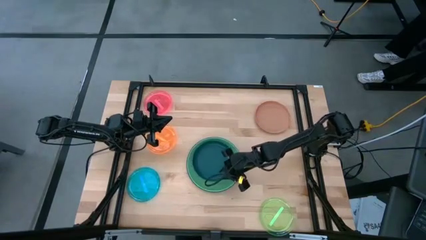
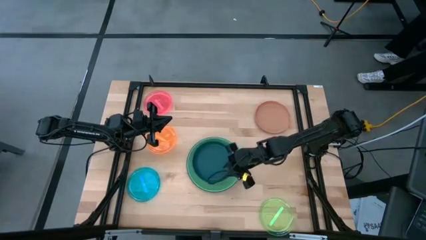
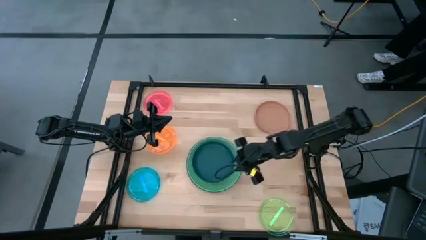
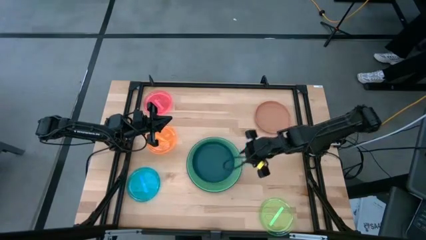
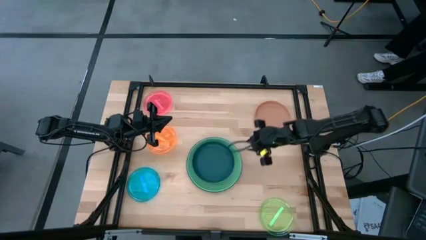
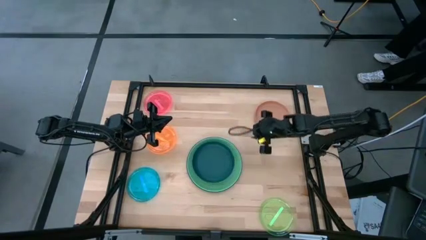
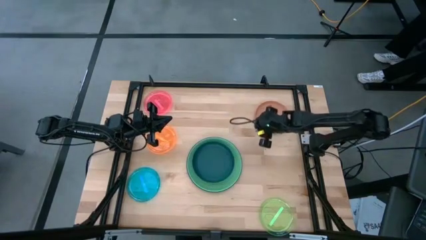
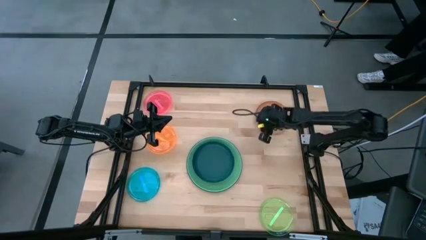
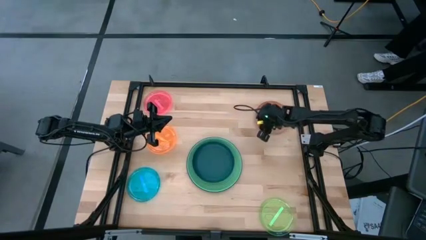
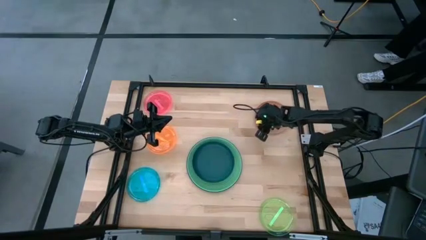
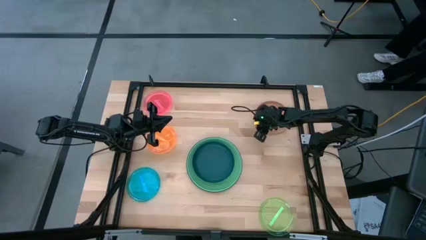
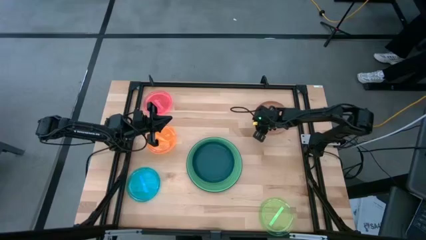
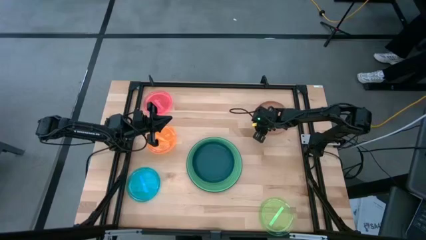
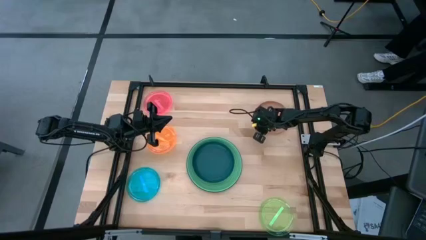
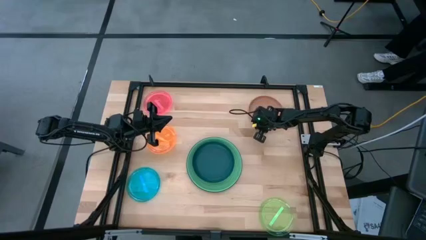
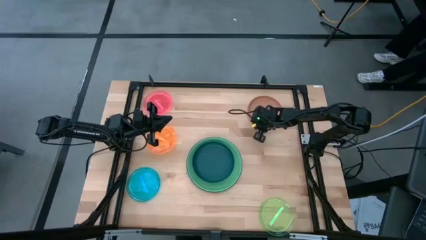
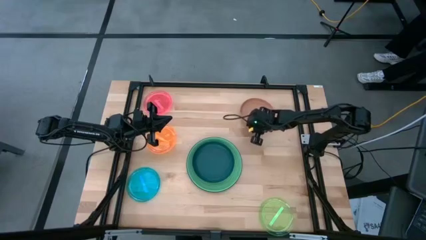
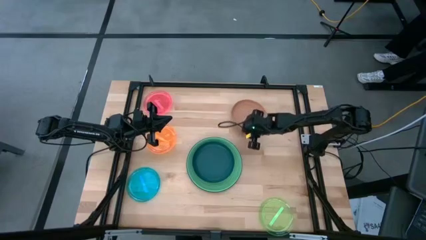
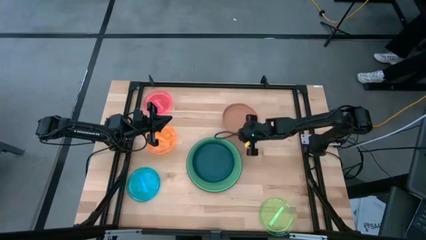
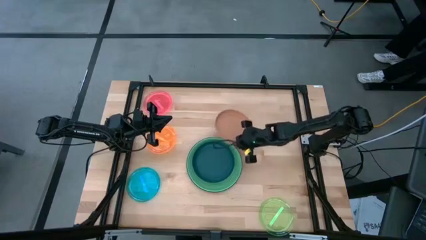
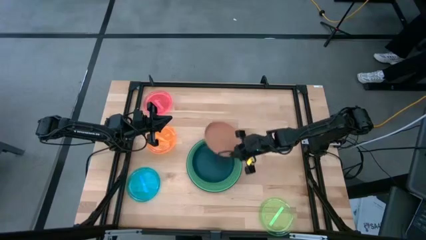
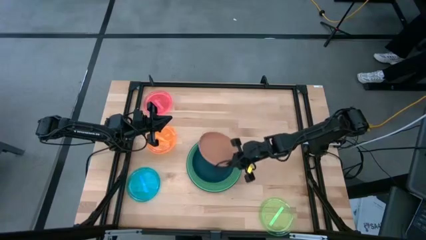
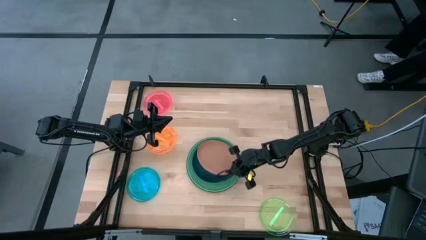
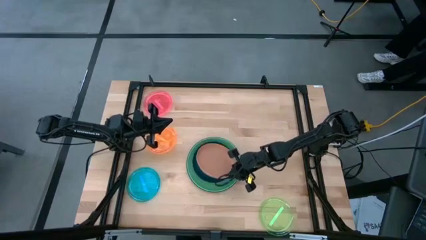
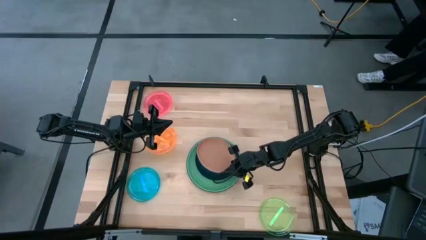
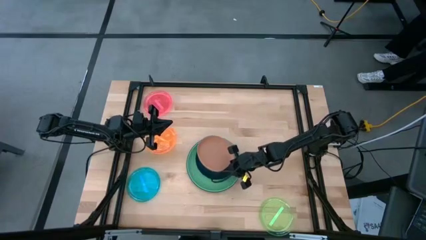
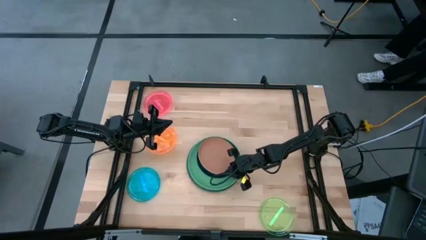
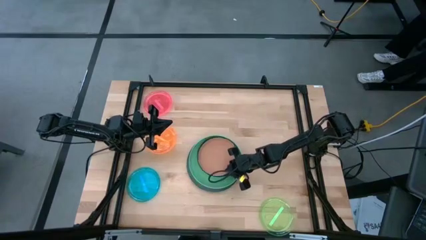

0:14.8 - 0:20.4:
Task: Stack plastic plates
Stack the brown plate on top of the dark blue plate

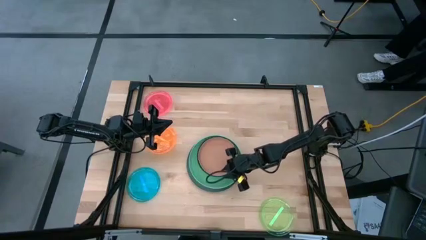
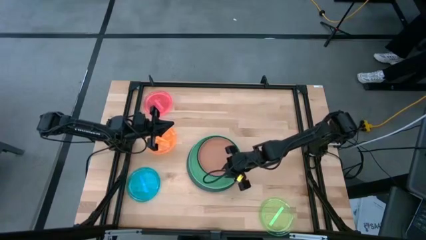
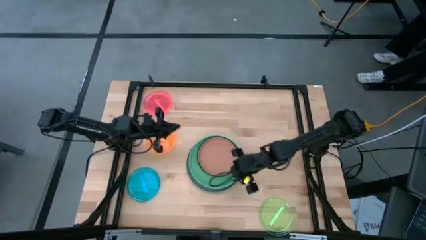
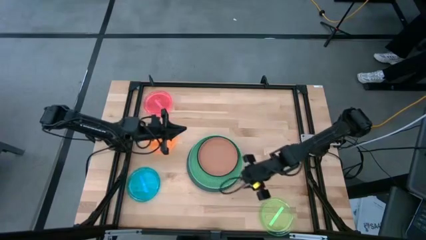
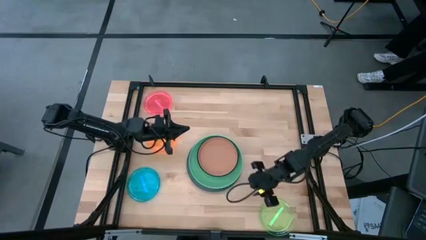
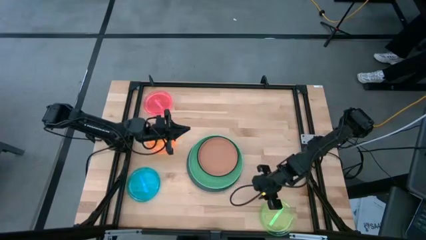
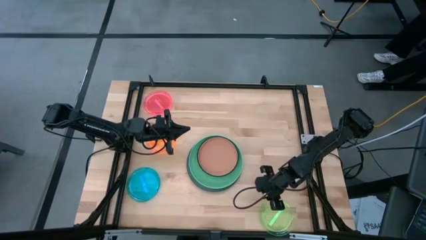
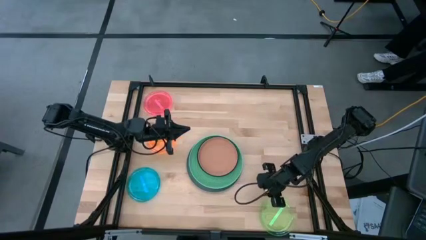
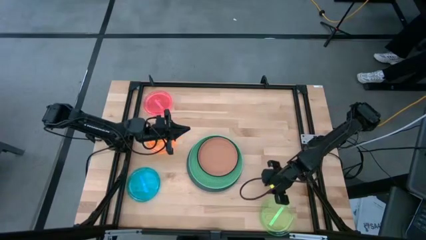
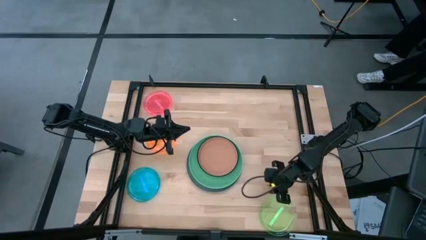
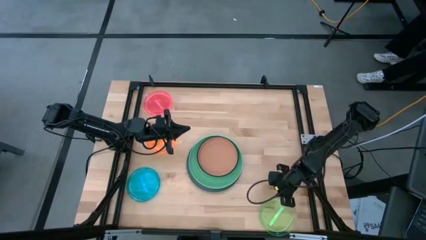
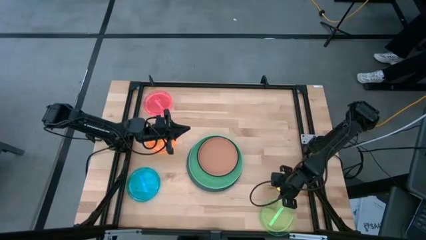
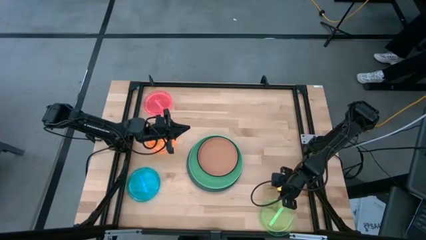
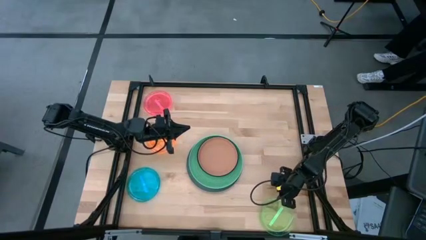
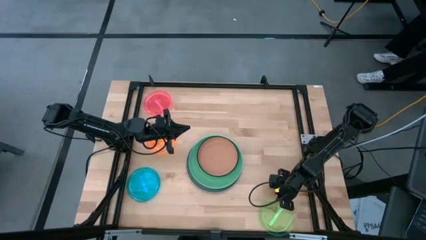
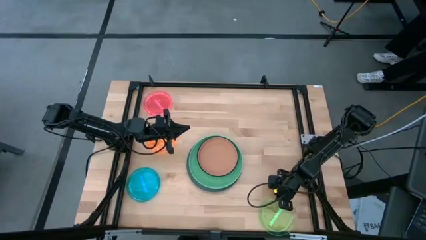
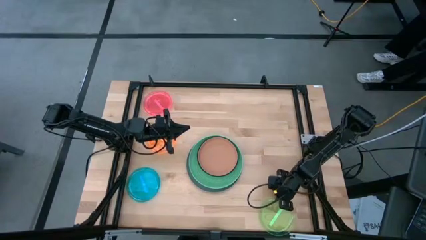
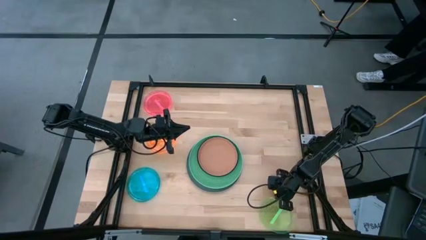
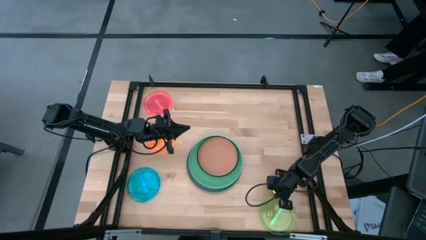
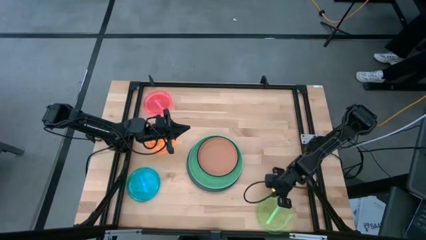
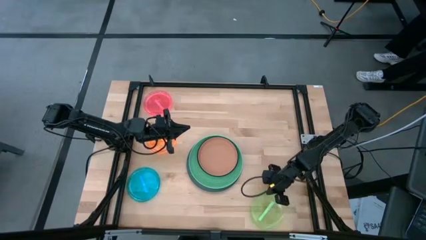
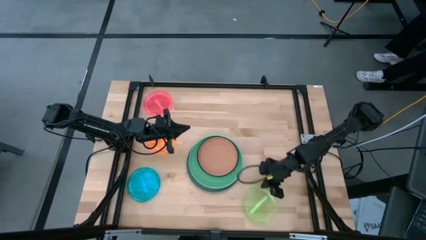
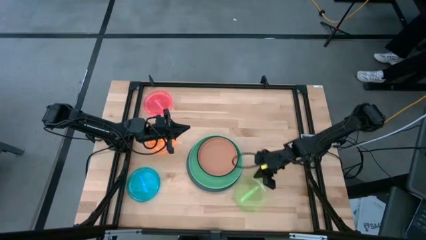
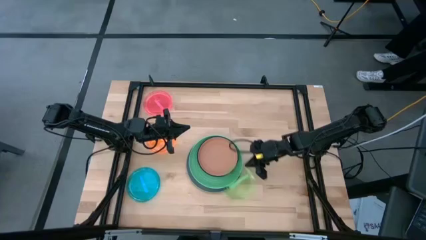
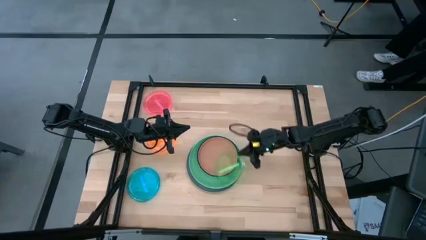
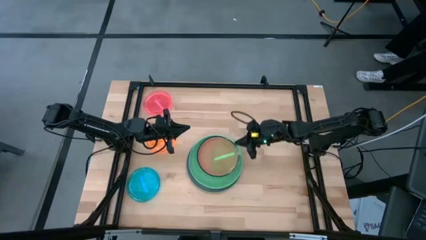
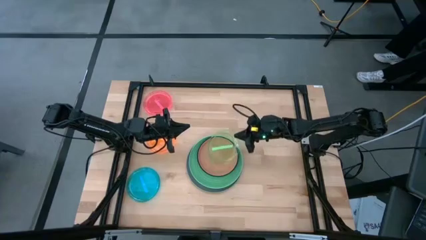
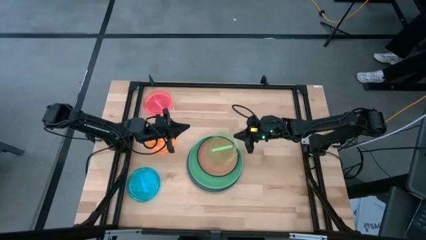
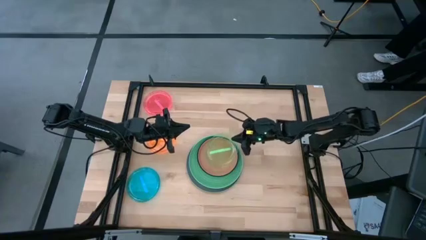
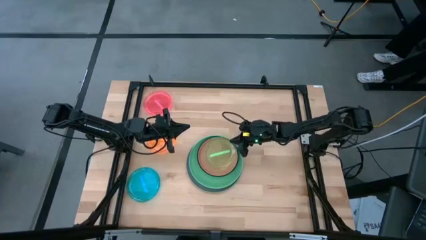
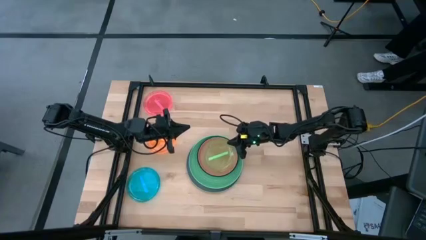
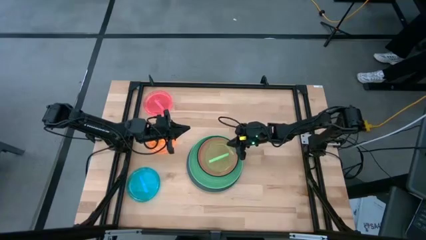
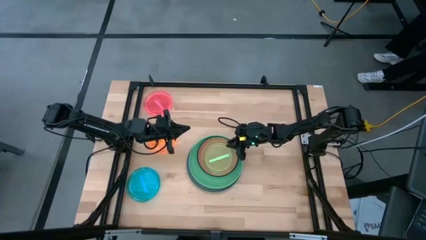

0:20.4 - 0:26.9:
Stack the light green plate on the top of the brown plate

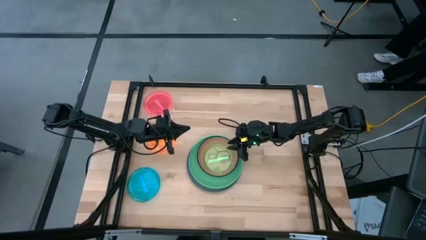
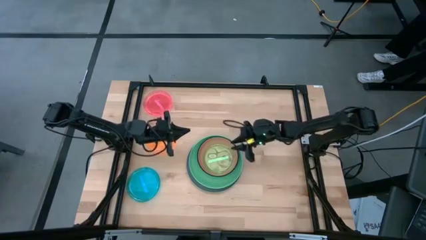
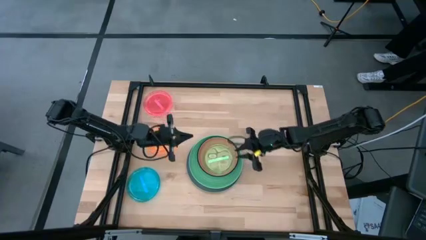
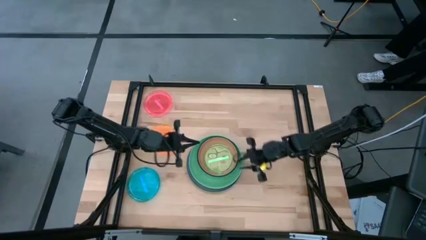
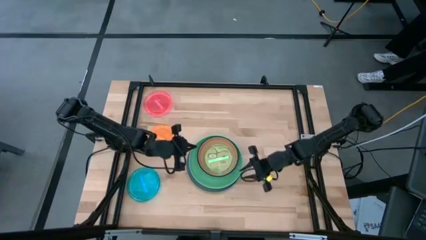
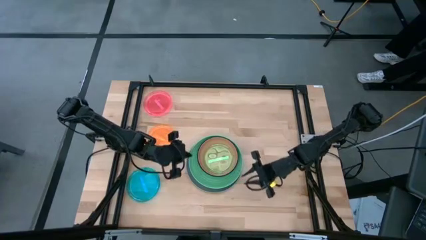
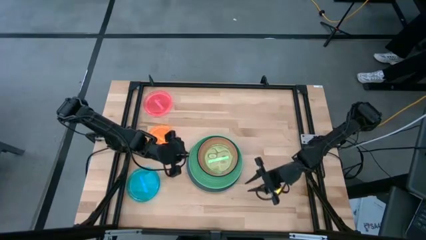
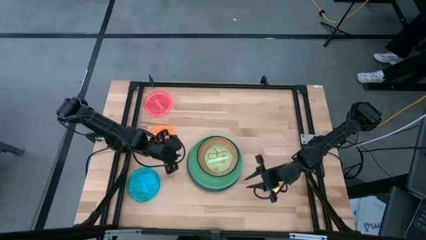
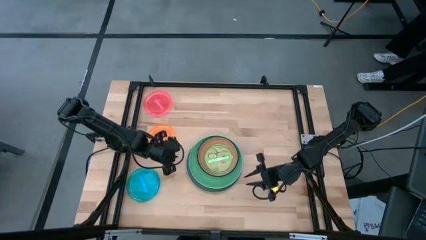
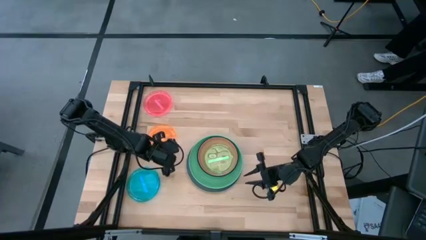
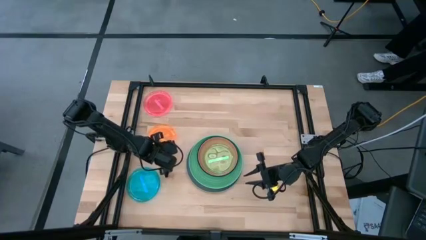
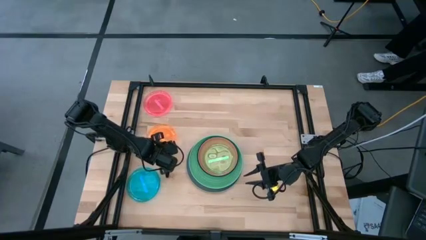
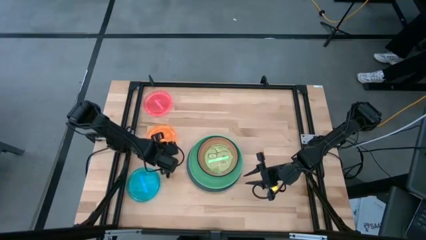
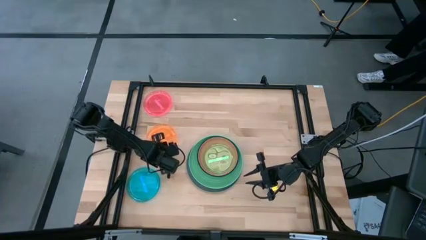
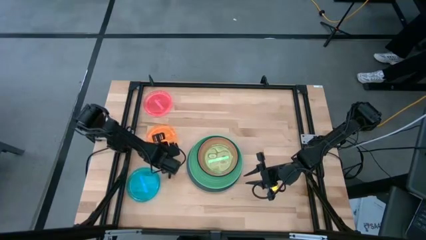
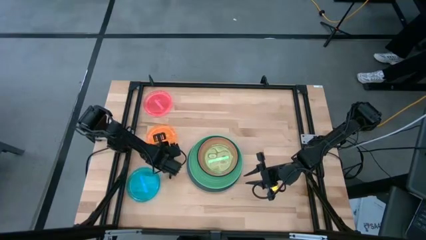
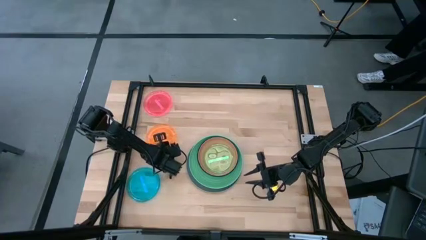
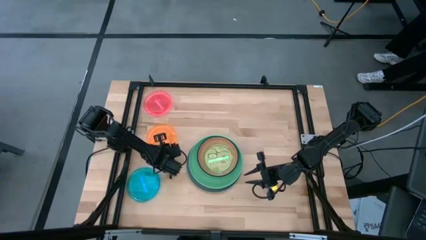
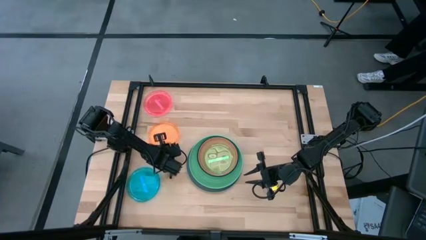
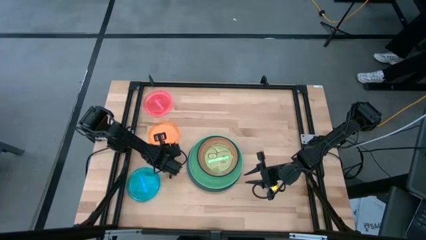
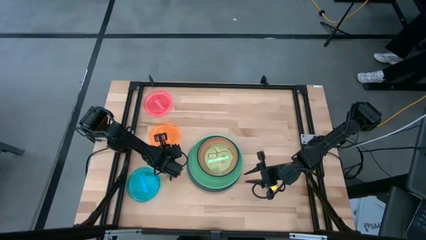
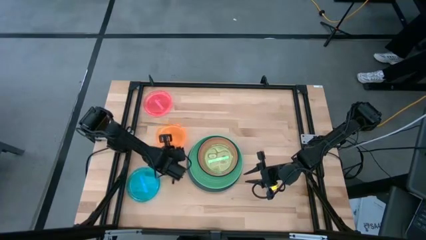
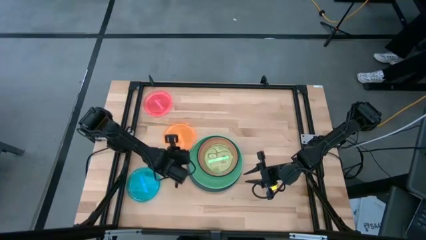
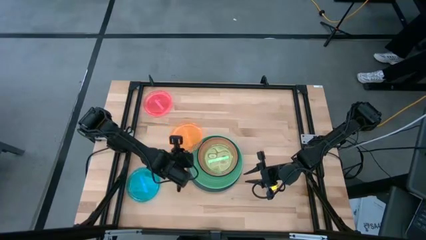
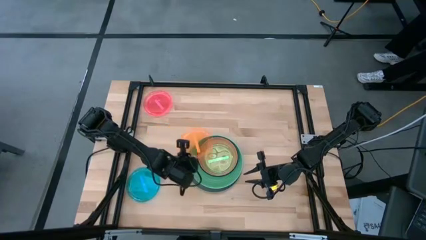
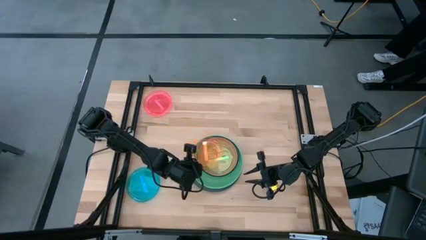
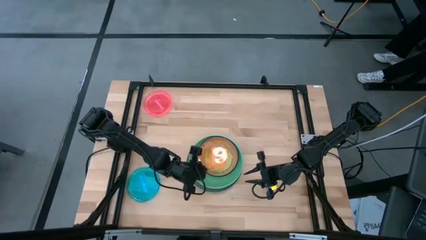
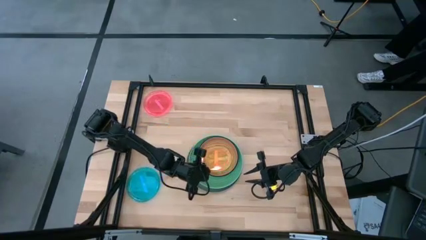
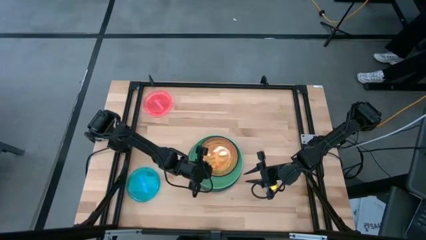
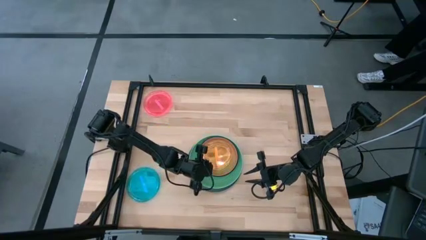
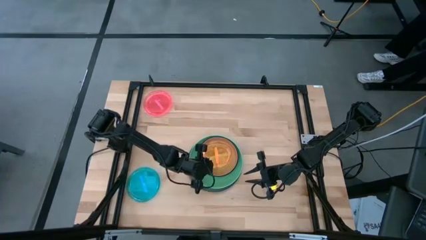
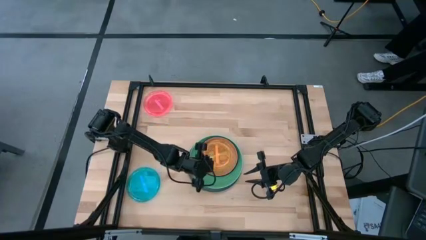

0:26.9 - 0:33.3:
Stack the orange plate on top of the light green plate
